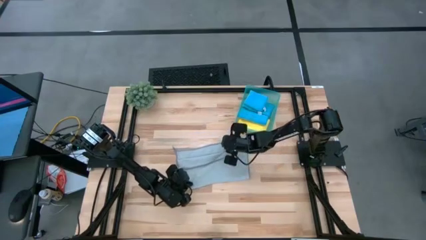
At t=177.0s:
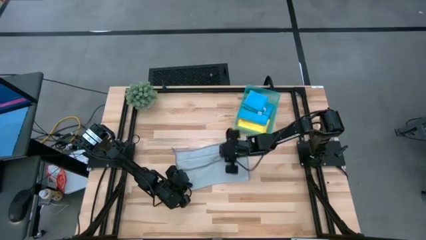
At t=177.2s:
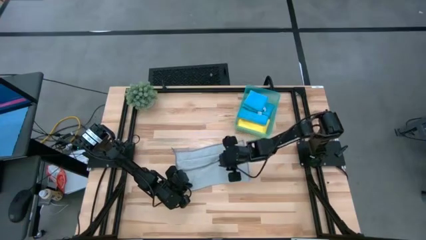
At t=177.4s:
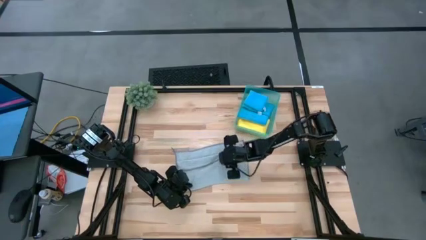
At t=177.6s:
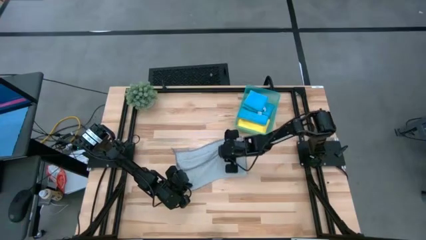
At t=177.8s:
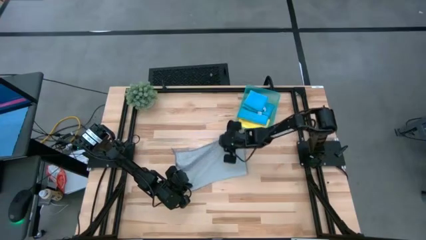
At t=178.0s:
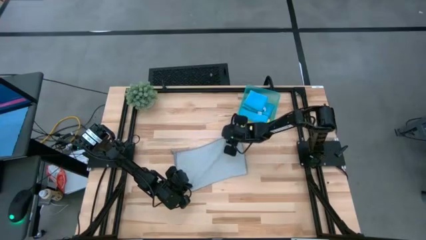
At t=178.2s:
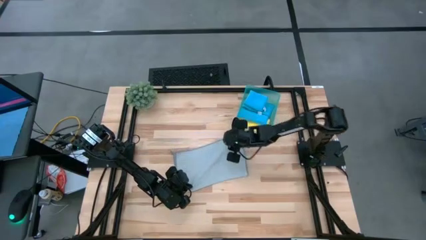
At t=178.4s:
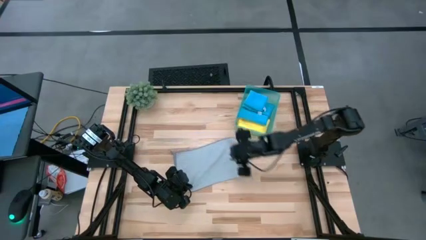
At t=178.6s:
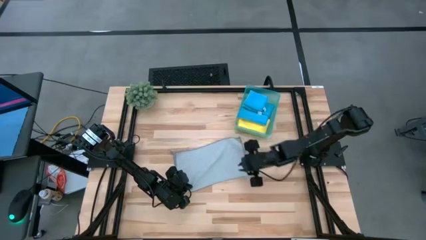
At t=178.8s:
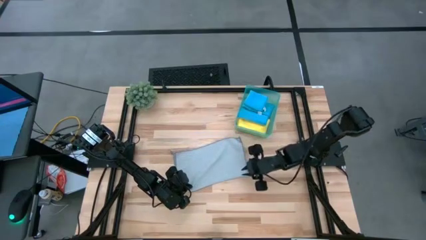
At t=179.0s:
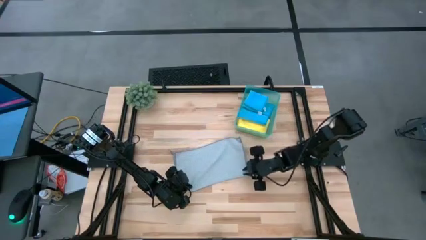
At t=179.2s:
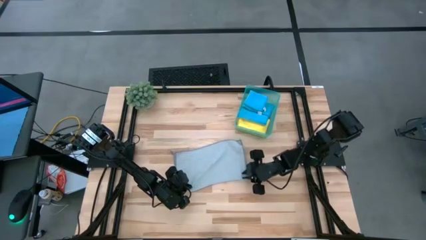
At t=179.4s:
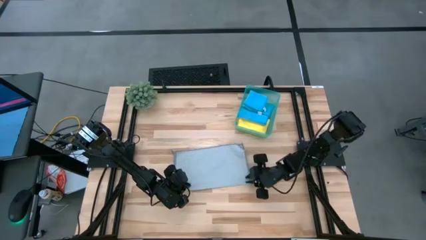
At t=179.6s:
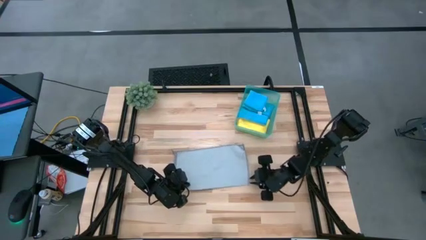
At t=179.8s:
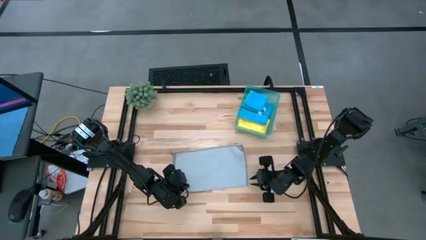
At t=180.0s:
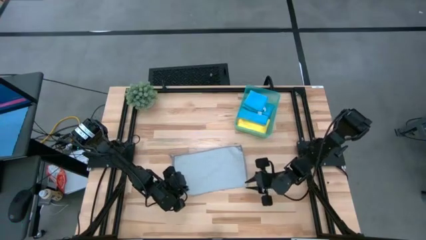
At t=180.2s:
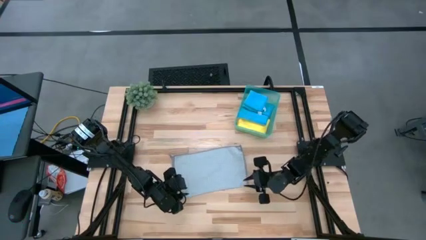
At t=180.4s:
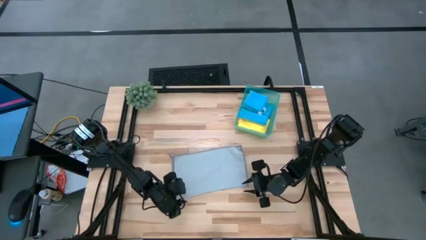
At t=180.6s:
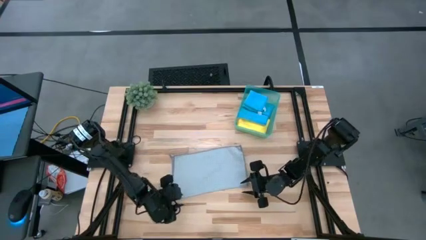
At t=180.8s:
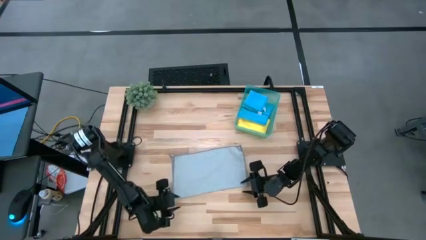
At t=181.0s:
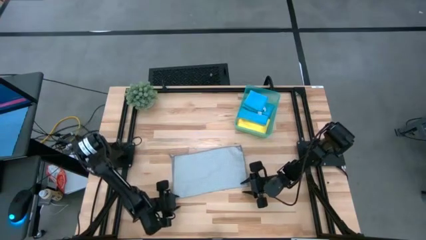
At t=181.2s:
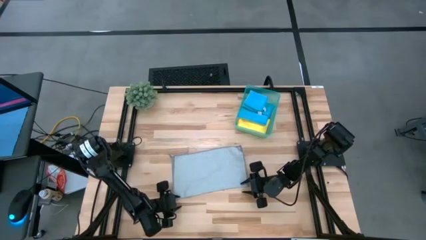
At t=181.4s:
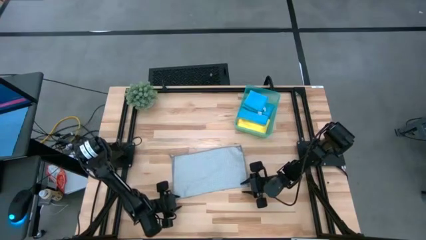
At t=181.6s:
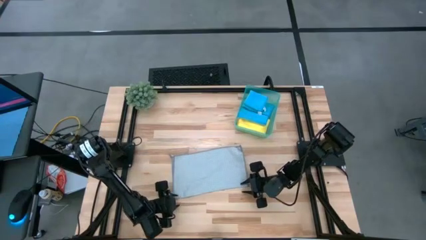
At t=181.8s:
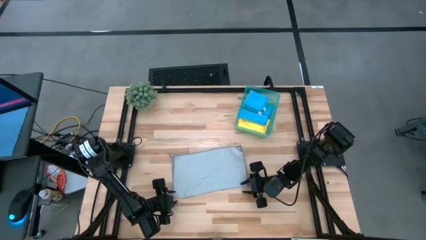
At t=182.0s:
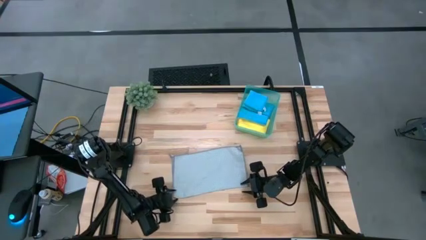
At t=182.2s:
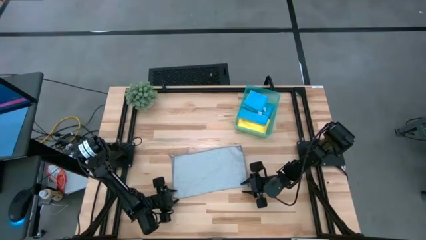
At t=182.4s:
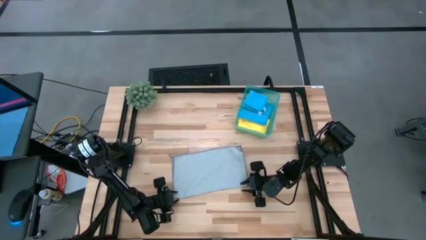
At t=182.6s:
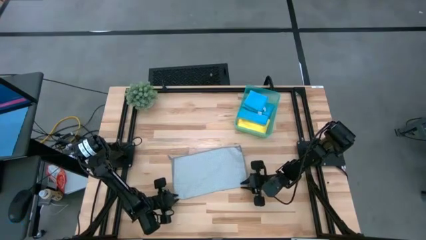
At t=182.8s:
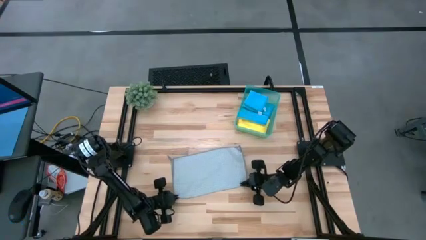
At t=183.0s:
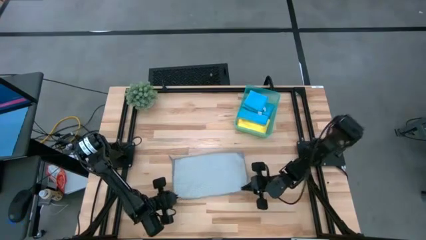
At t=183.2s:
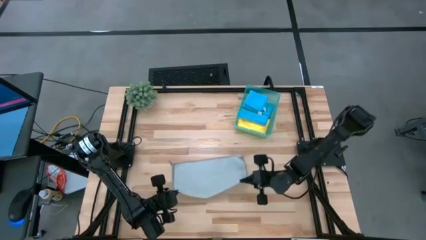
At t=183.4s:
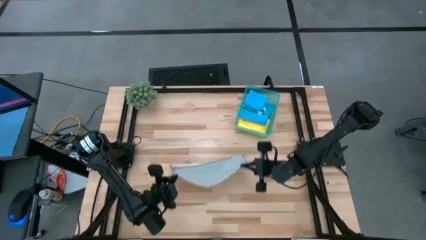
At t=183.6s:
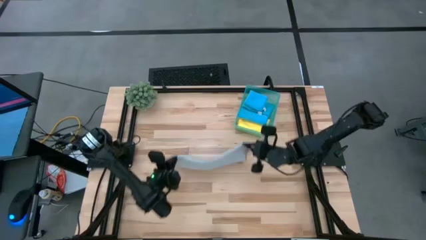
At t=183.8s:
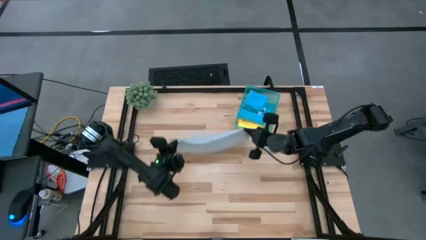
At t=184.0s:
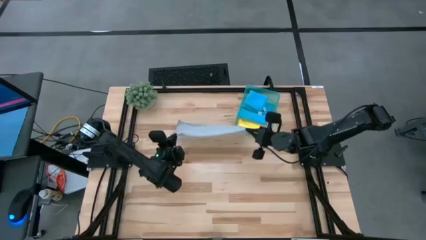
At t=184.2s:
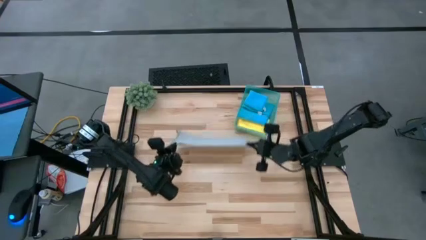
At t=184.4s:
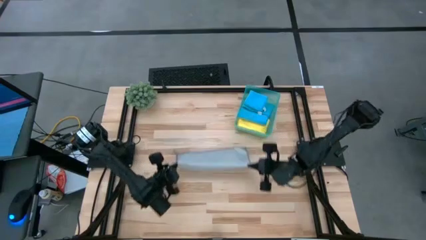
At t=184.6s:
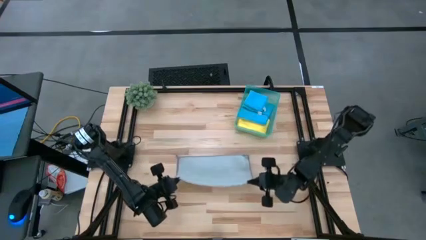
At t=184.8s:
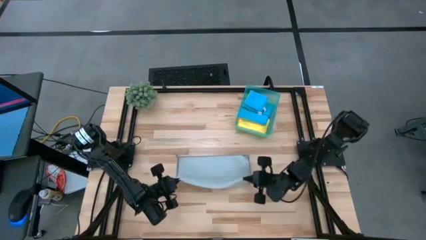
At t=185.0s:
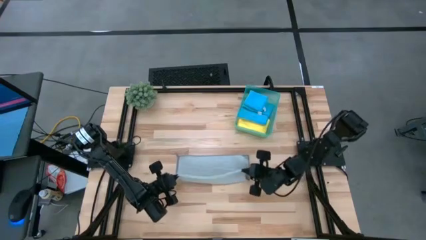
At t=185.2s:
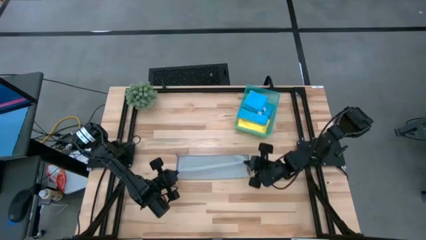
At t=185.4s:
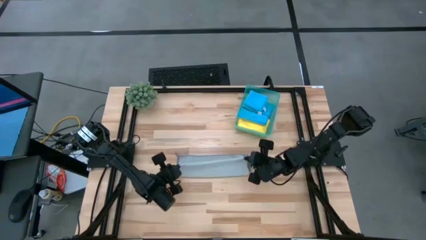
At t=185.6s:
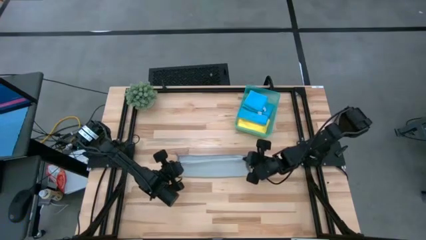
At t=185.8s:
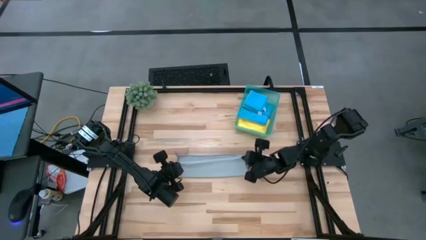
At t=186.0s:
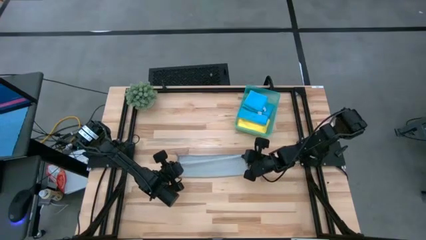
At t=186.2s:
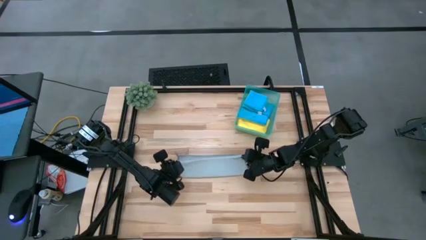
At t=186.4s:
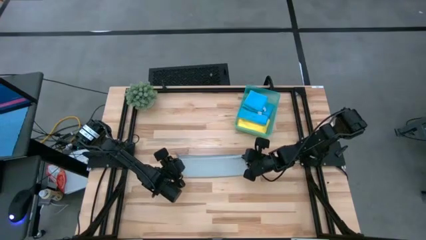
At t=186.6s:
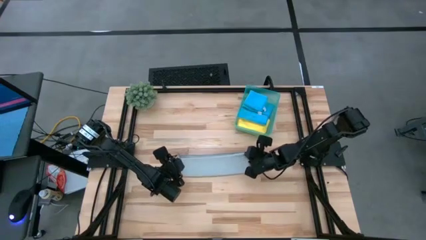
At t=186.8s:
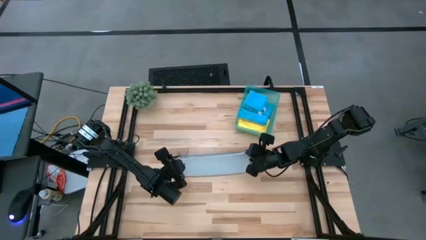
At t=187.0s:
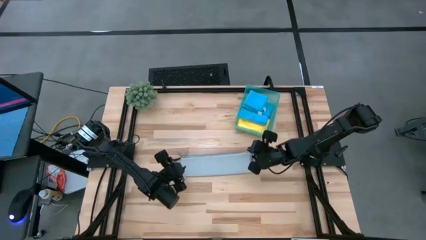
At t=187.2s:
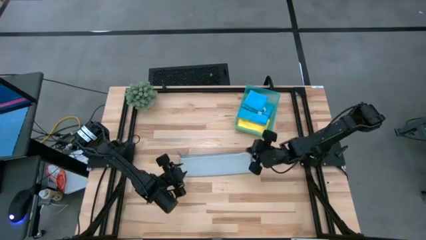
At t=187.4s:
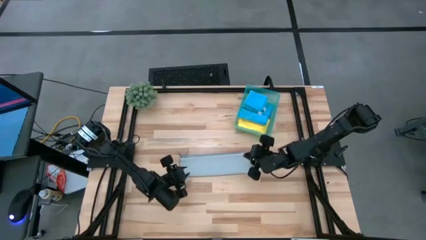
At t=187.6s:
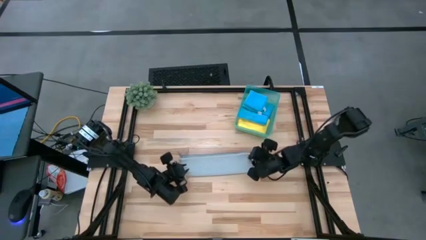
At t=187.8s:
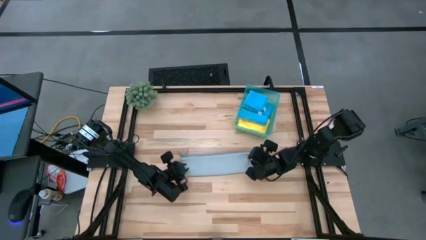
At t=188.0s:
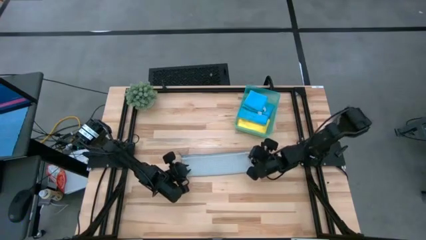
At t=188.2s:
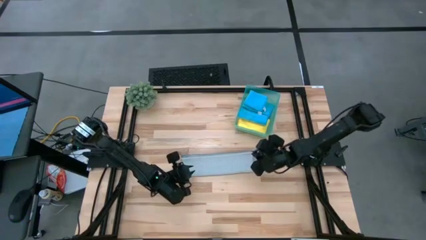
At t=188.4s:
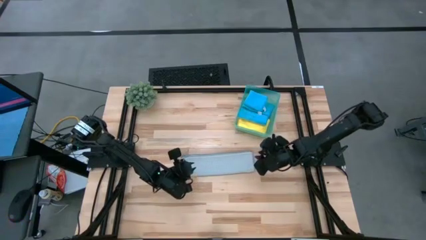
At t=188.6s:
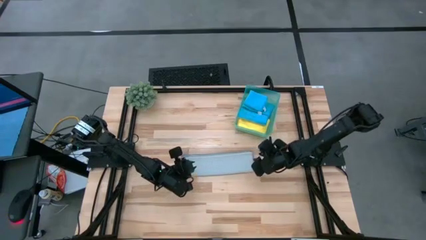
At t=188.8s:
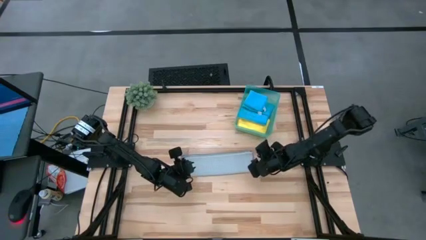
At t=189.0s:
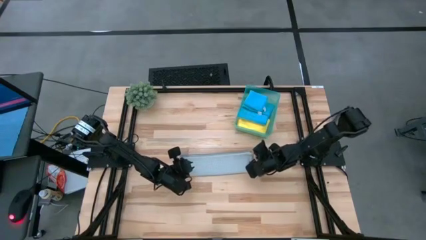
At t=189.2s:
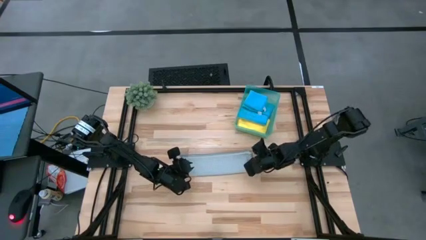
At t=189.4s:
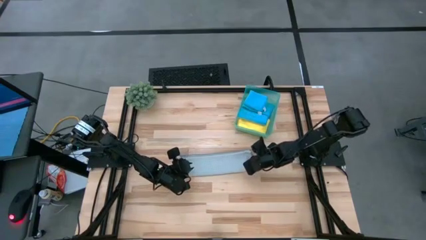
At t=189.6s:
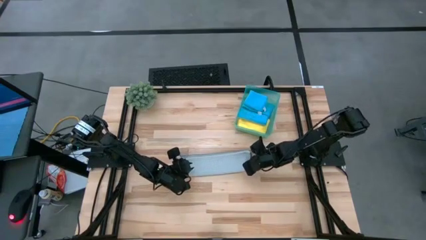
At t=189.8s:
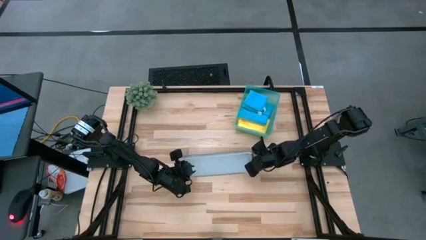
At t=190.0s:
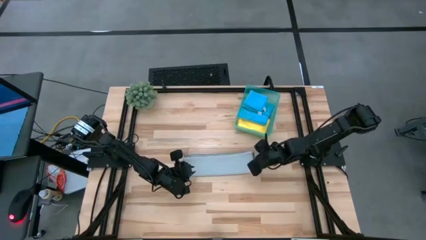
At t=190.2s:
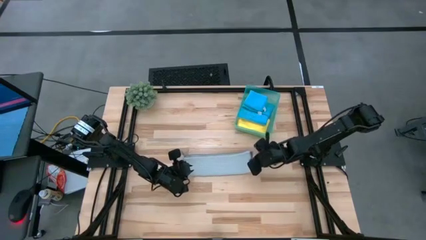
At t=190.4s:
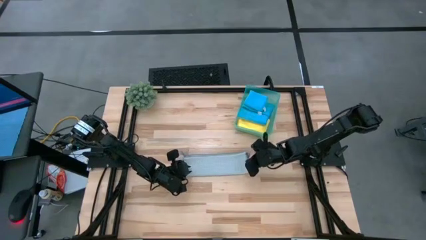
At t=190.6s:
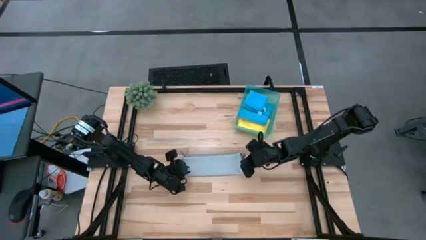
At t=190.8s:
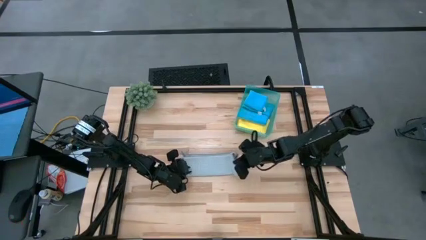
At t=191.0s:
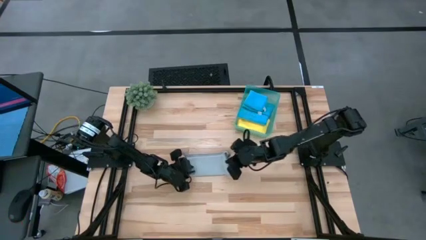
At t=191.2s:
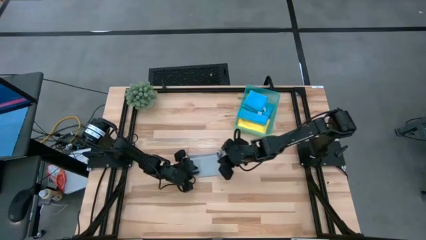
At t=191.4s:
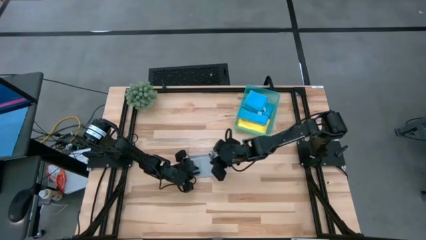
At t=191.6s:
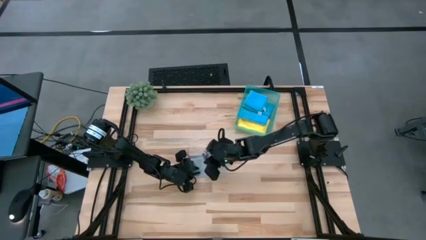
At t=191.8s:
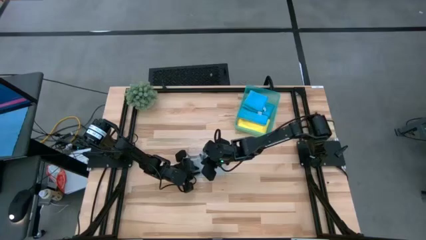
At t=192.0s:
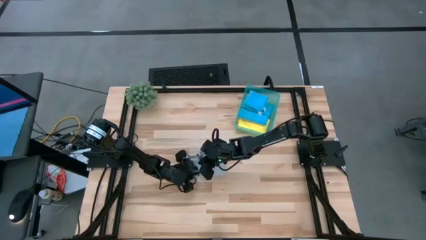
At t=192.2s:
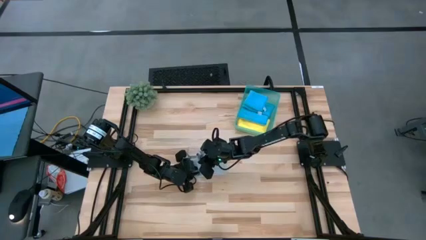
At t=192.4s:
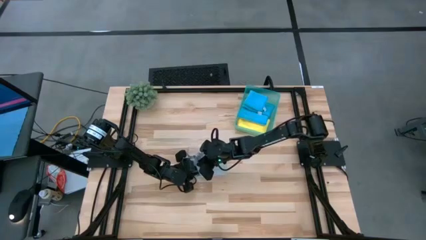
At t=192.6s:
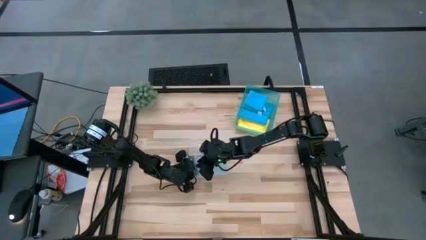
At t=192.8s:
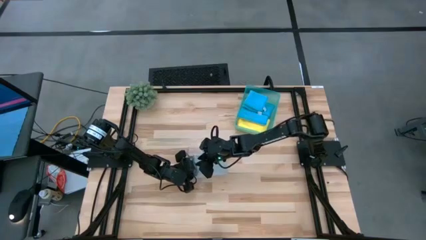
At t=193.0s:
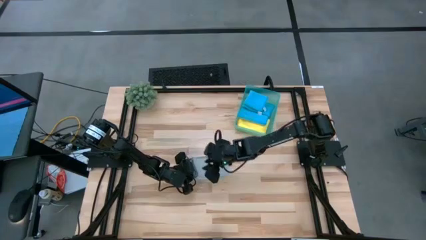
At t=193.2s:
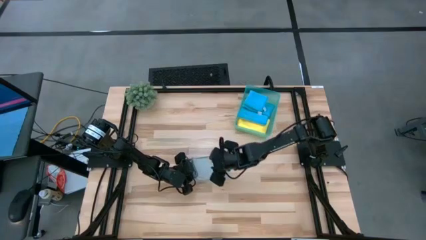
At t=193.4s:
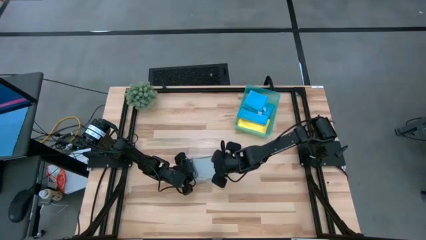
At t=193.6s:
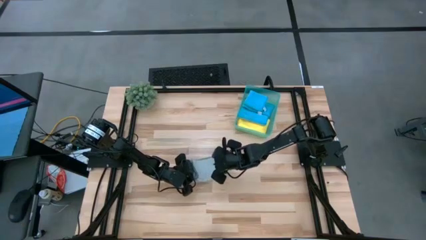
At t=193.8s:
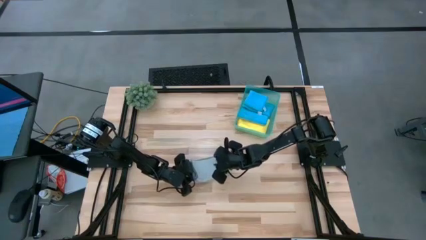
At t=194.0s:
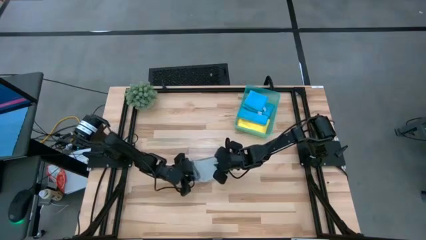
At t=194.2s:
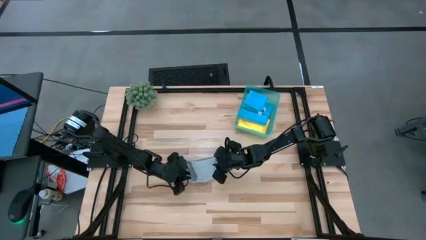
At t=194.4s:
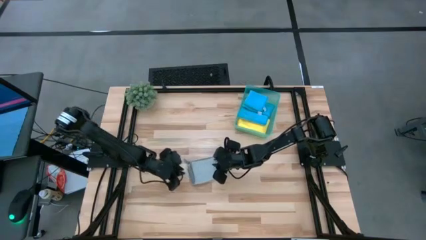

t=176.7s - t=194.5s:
Task: Fold microfiber towels
Fold the gray towel
